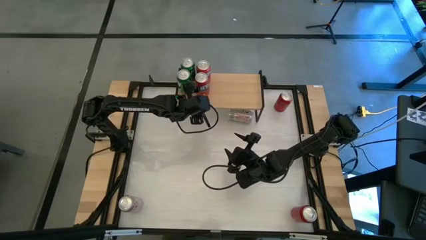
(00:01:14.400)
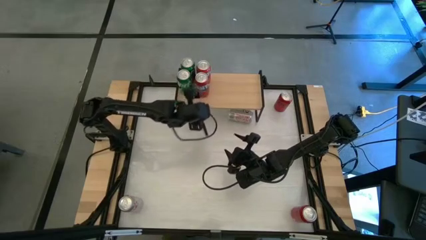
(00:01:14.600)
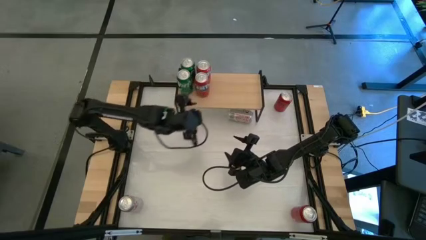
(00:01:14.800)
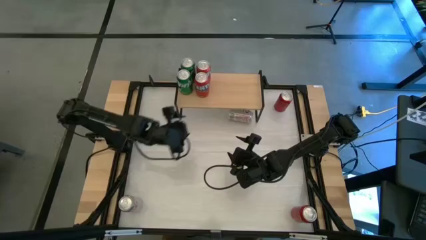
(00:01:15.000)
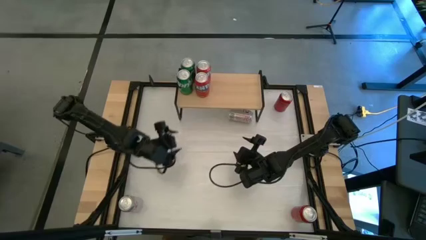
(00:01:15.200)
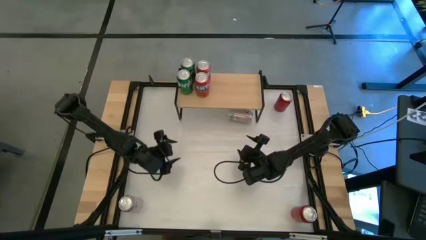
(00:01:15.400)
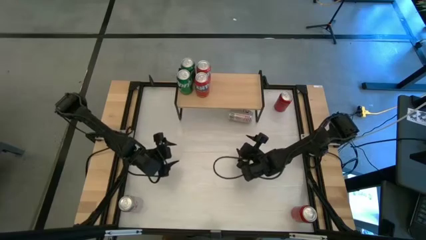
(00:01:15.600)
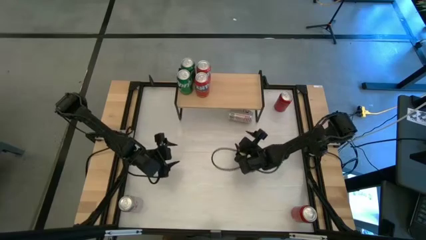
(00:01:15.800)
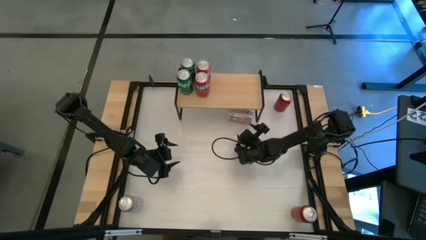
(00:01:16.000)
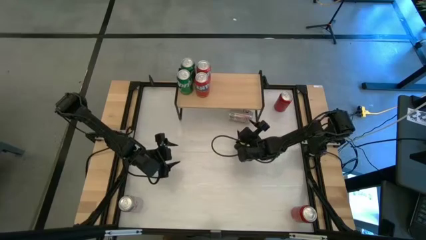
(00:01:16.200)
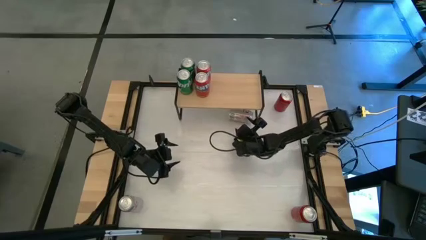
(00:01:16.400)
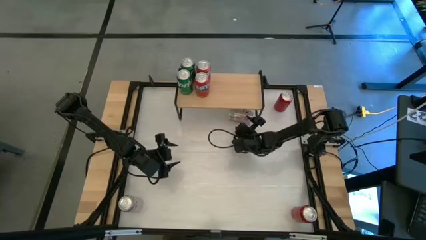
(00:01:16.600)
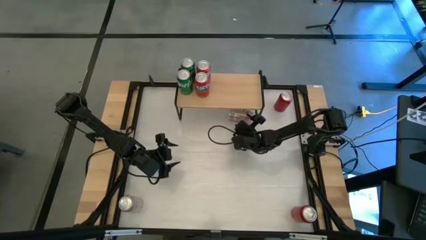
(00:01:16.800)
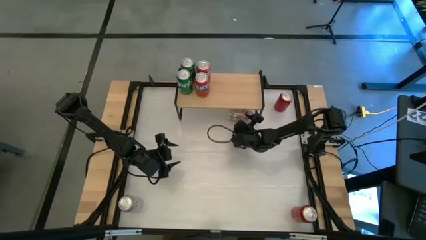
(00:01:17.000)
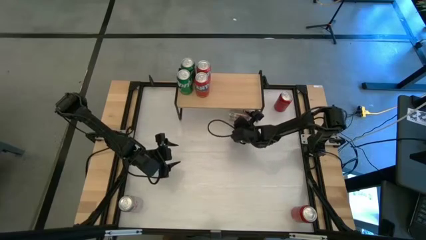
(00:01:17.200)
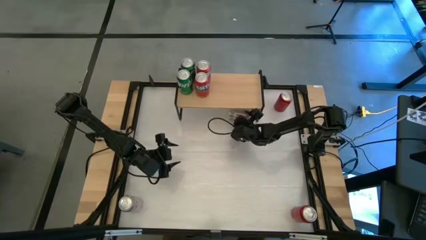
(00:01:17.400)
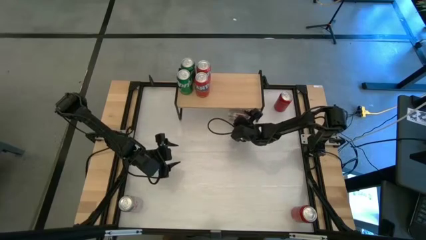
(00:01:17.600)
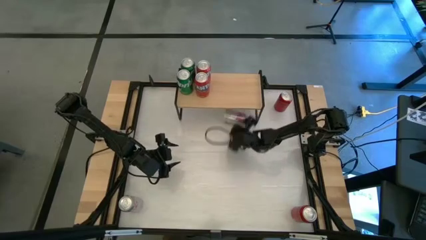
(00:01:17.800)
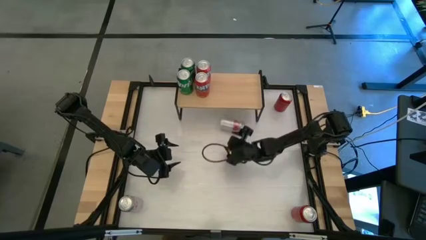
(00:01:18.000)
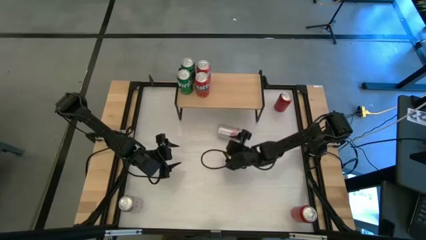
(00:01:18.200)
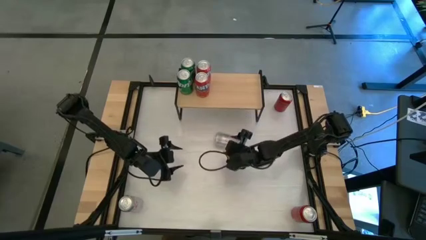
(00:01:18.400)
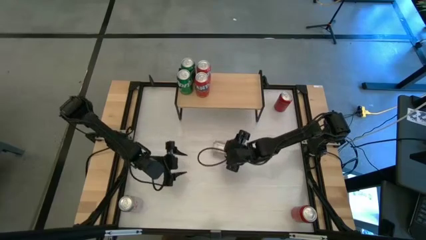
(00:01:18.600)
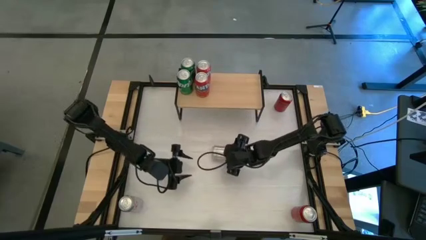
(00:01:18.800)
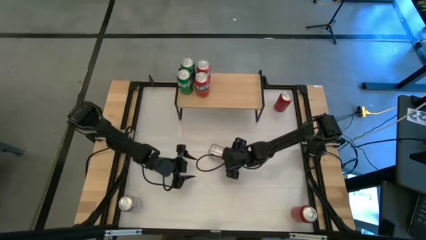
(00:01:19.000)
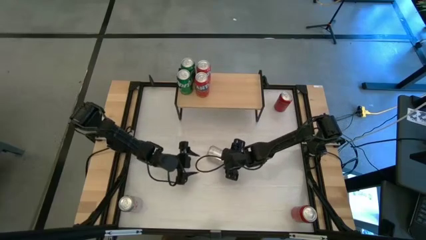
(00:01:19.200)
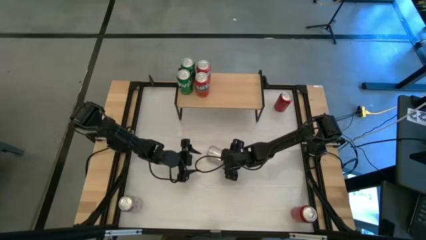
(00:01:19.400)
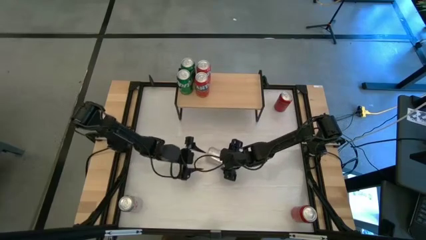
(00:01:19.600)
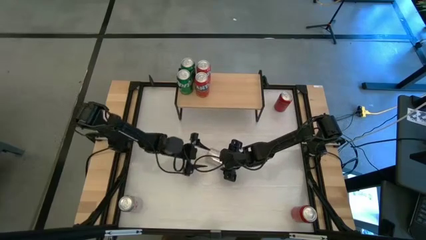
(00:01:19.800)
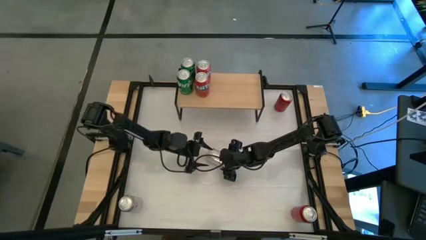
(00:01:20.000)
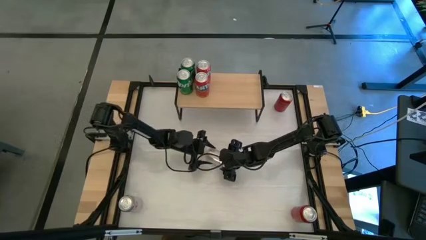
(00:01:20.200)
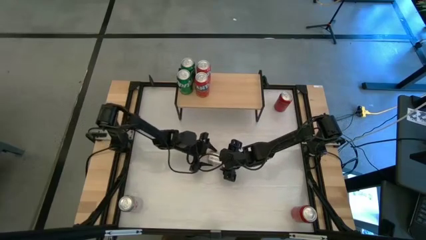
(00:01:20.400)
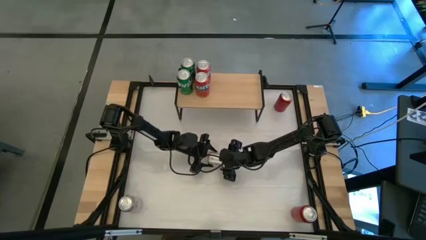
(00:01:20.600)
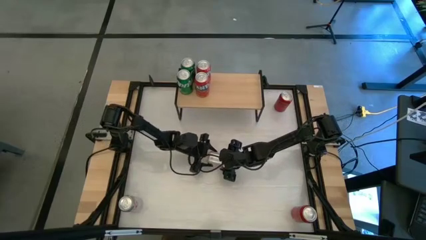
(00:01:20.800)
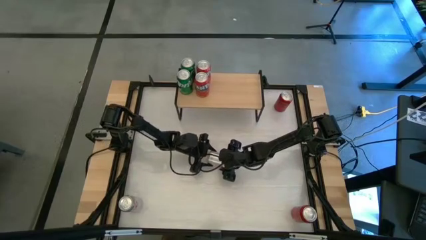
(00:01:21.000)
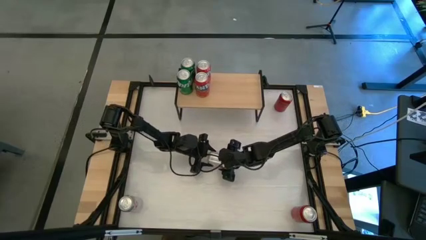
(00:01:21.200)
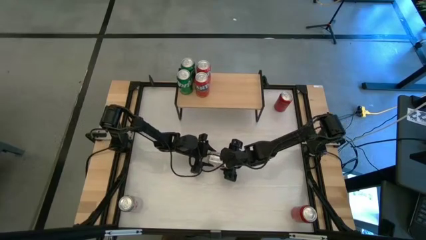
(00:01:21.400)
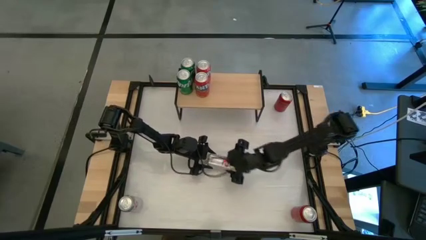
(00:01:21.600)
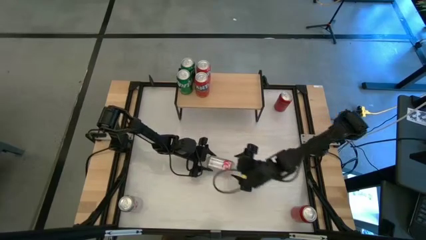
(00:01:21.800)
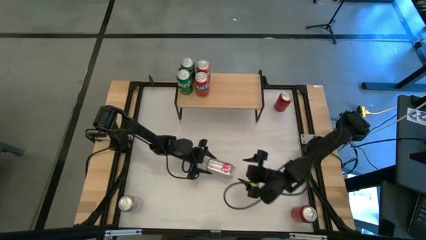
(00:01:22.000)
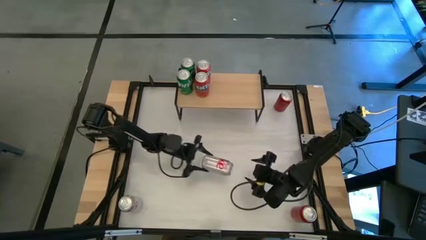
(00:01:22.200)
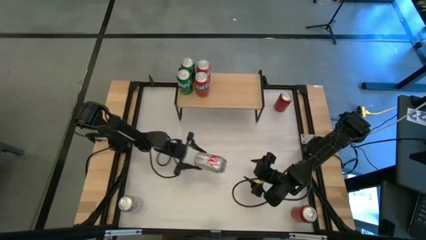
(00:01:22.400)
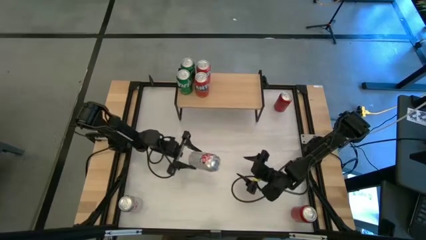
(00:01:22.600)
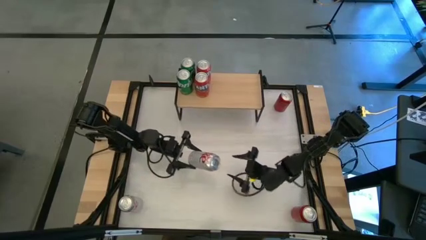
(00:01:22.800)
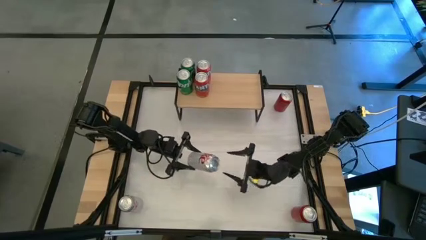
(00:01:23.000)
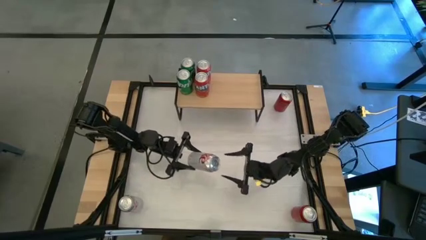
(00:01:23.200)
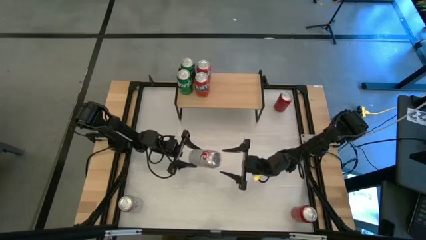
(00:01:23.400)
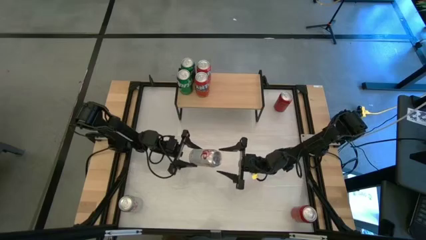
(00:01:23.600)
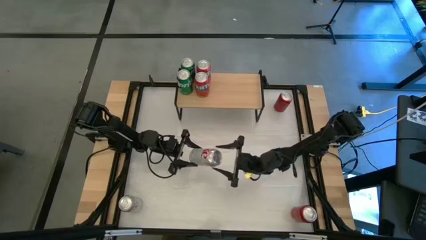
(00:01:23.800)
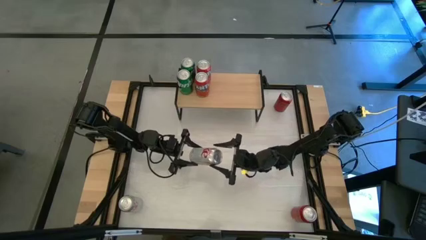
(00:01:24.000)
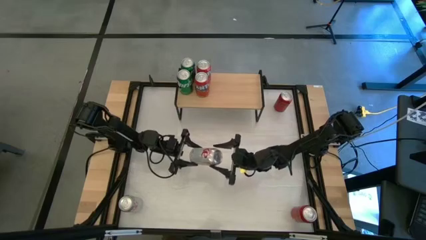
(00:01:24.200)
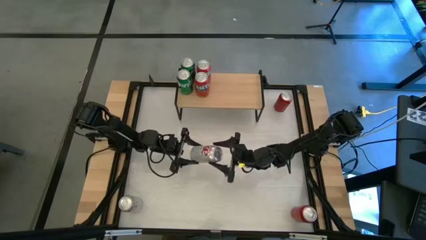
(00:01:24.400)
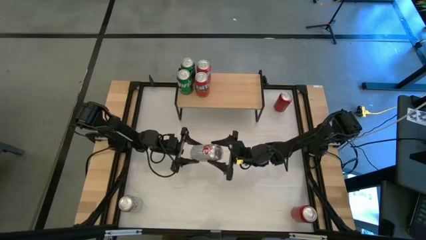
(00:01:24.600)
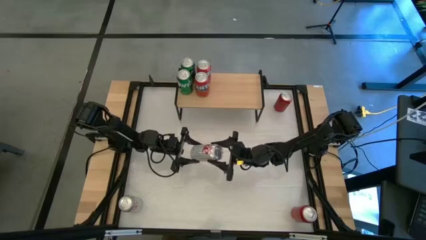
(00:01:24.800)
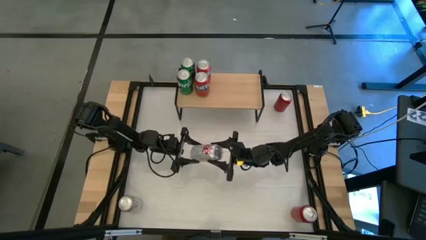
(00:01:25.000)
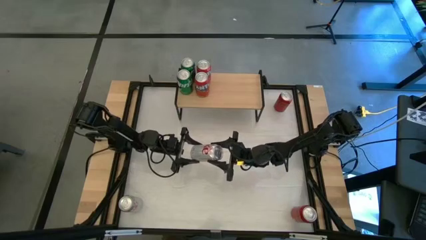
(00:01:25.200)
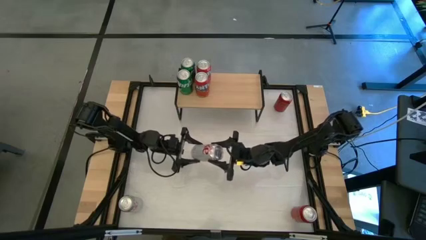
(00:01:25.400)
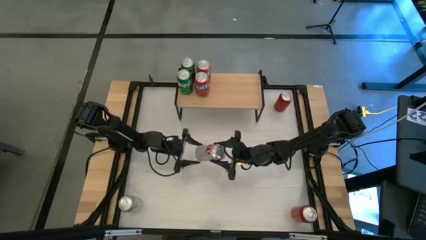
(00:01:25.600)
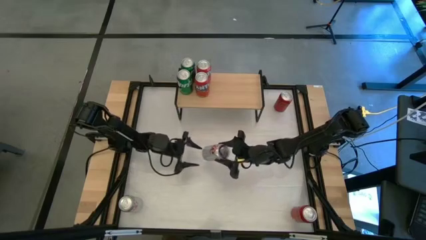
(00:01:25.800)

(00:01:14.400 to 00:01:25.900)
Task: Place canned beverage on shelf
Put the right white soda can on the shelf

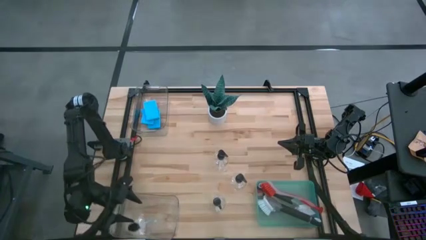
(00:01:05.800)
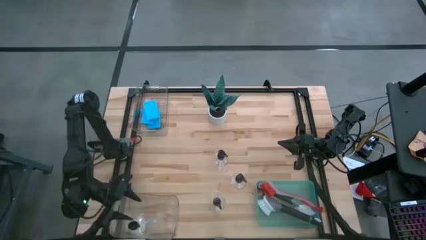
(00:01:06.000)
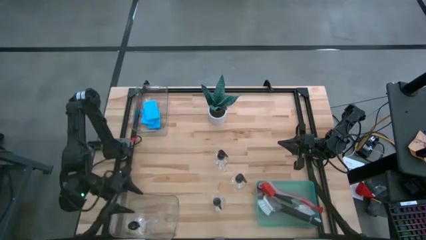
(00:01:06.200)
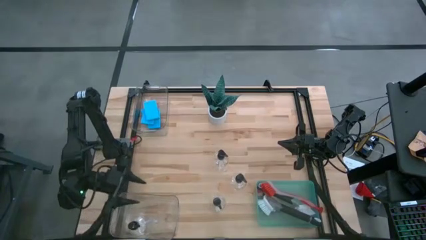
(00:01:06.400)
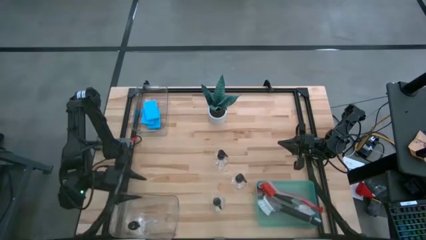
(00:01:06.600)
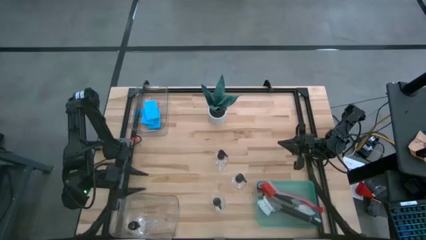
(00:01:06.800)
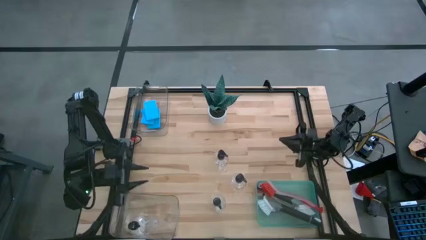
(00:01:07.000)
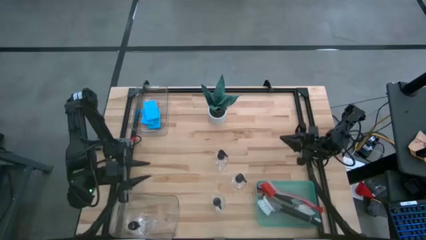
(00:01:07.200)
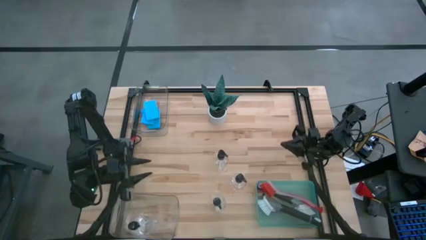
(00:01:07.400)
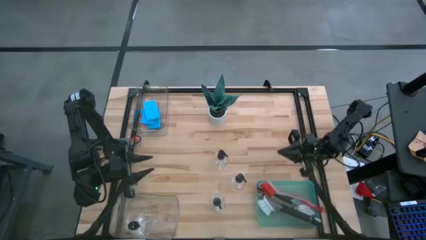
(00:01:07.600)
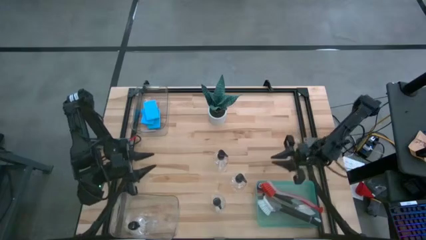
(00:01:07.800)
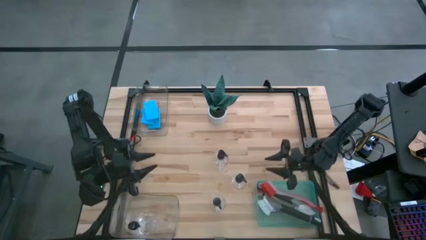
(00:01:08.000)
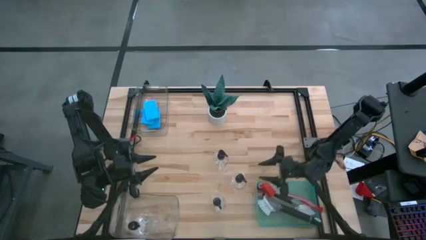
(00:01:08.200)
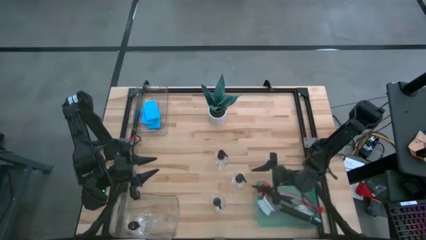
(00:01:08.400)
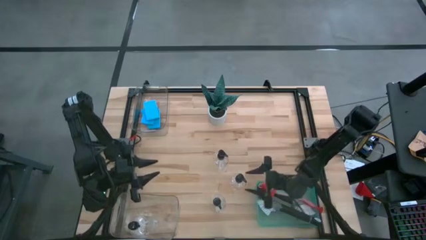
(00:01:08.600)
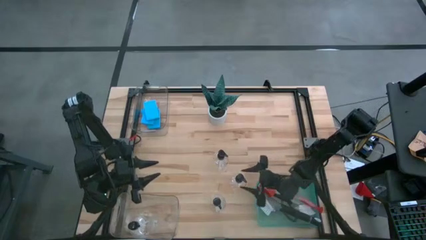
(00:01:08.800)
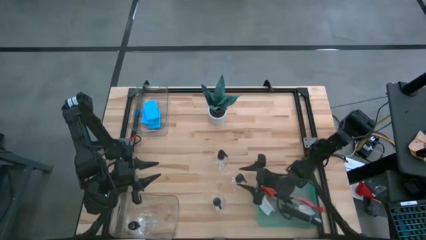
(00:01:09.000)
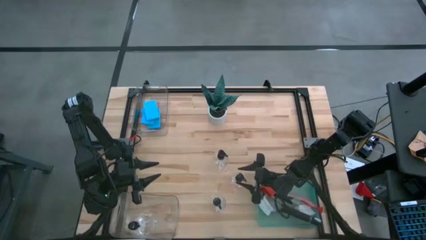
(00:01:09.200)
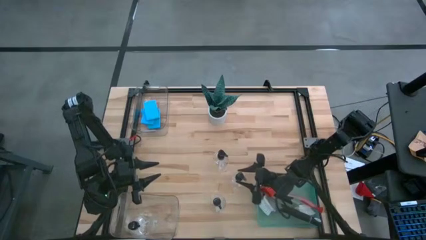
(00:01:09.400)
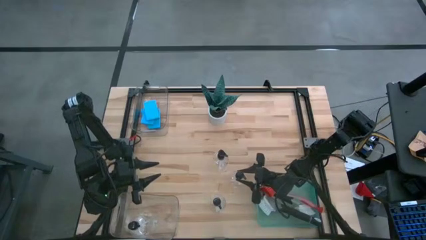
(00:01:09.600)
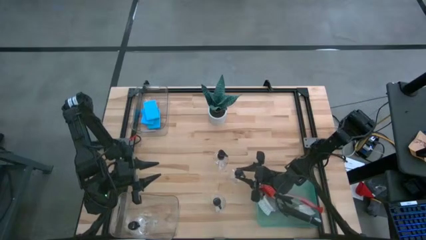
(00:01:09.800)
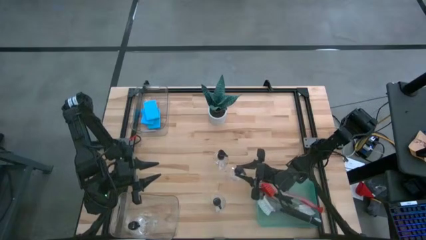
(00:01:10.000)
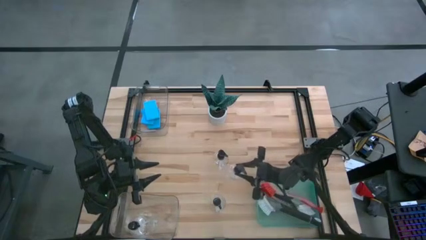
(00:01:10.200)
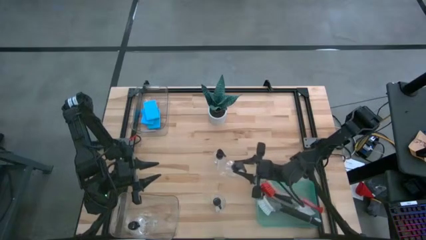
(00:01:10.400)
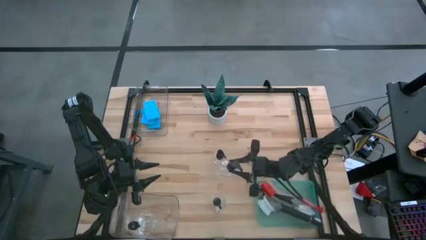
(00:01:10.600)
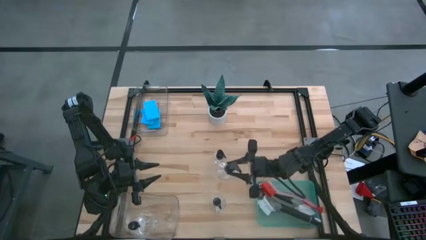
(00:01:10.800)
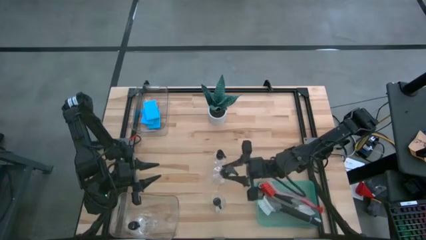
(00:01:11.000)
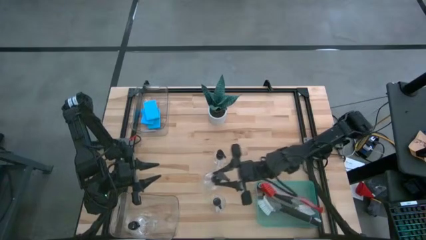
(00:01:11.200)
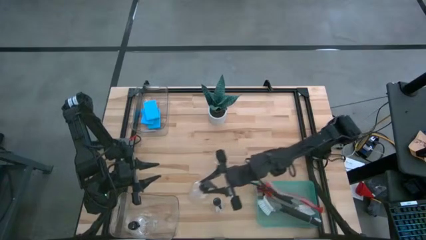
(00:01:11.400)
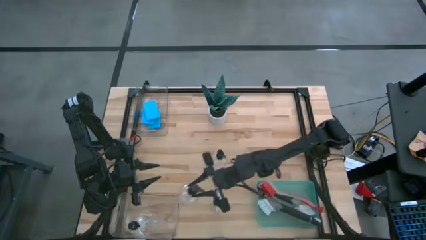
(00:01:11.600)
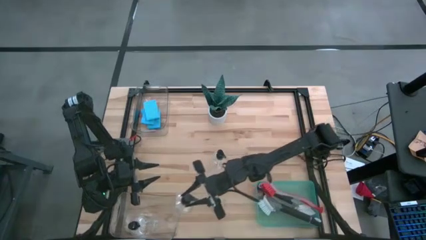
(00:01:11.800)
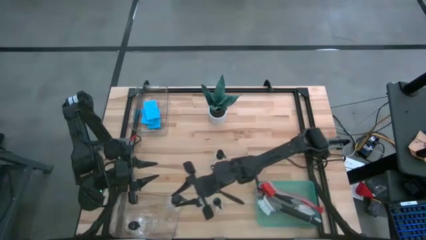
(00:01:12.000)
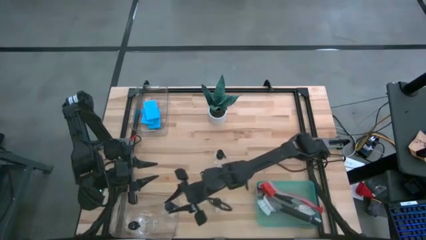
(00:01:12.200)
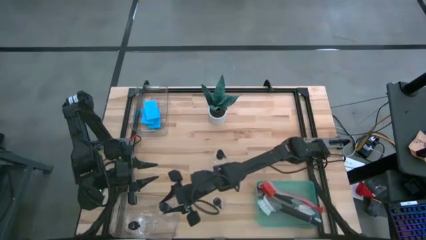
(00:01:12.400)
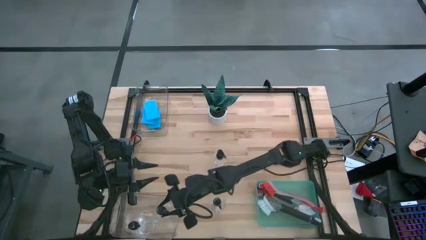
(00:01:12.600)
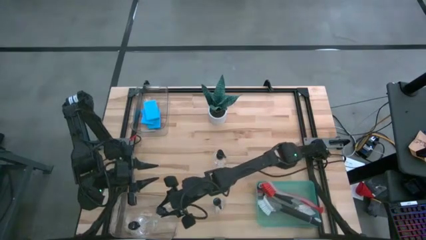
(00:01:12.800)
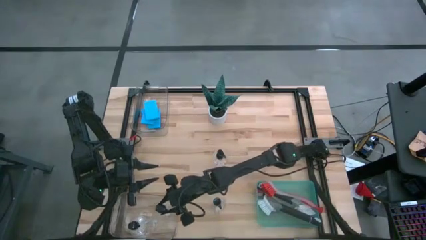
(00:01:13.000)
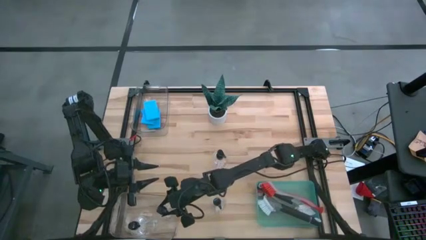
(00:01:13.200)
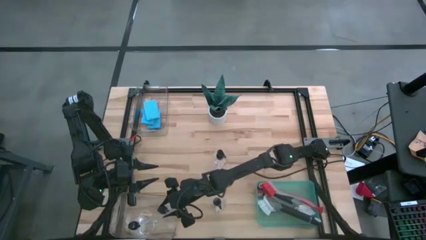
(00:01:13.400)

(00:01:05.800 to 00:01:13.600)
Task: Pick & Place Kitchen Sink Supplies
Put the transparent spray bottle into the bottom transparent bin
